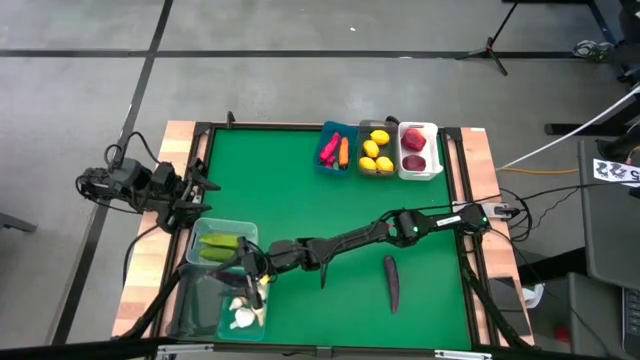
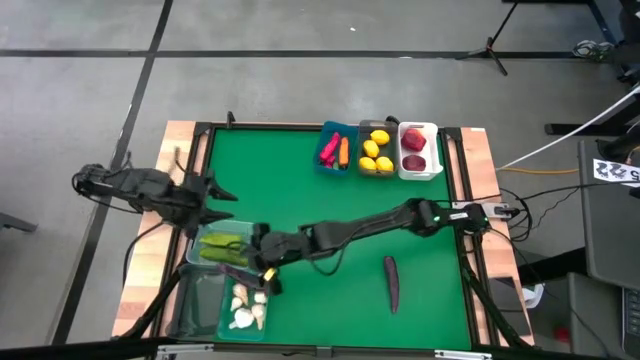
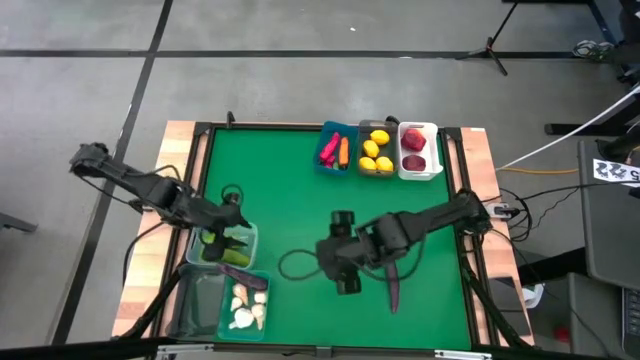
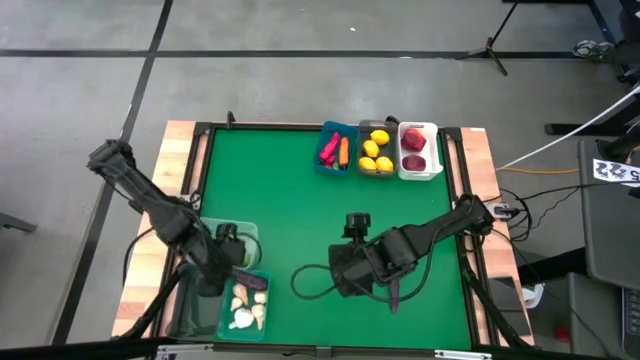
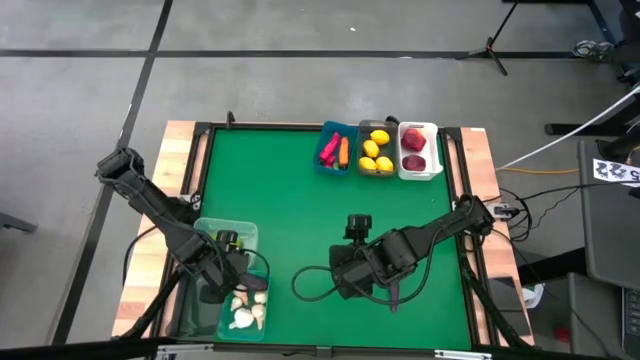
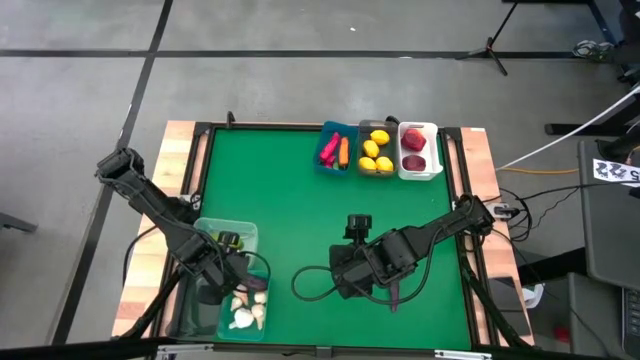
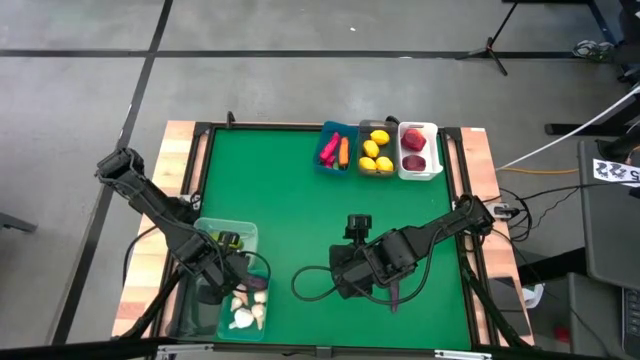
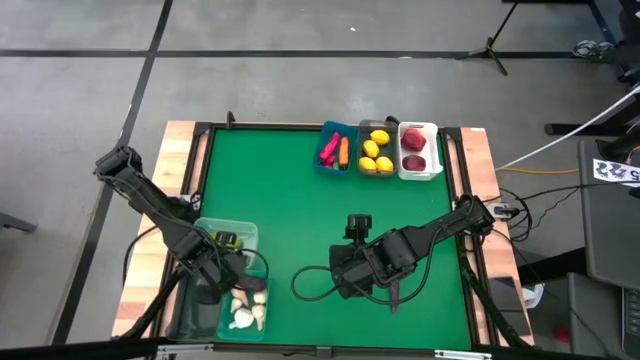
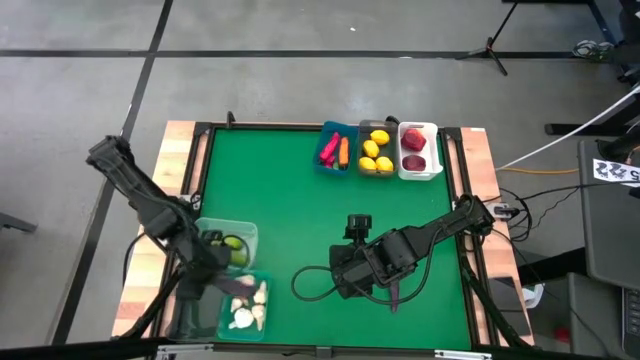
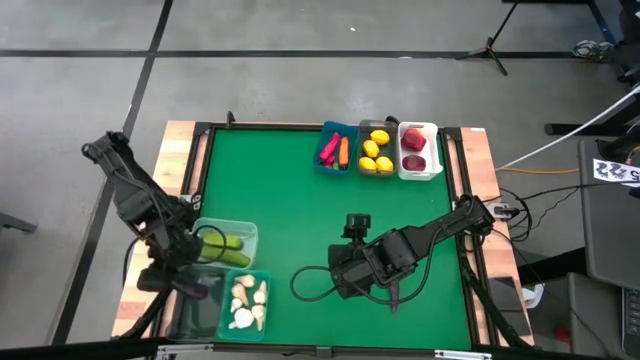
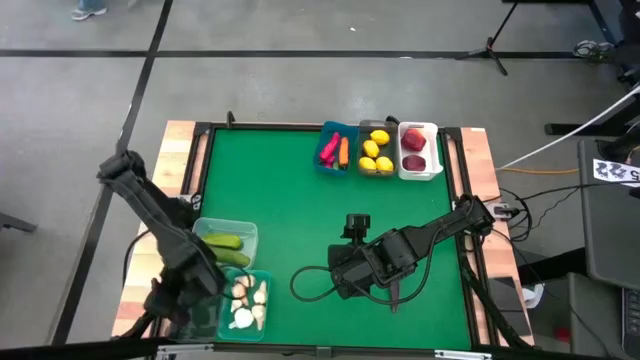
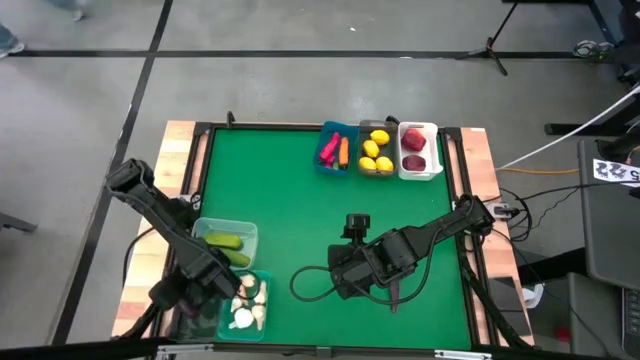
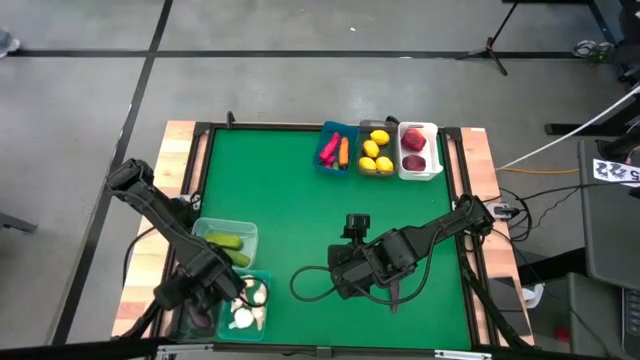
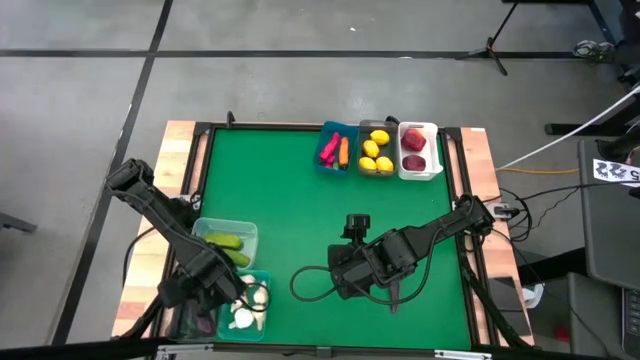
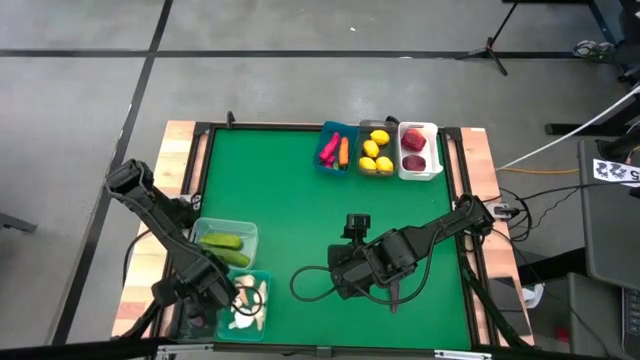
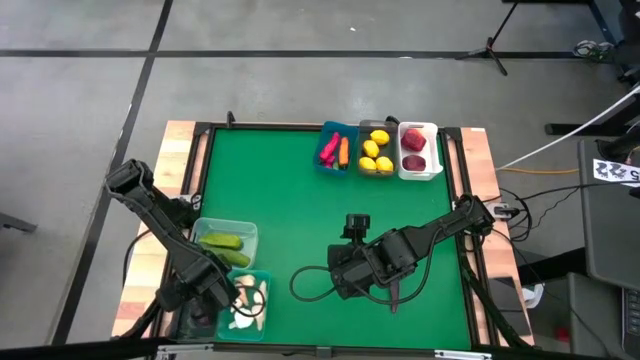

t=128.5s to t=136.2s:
Task: Sort produce into baskets
Put the violet eggplant into the bottom black bin

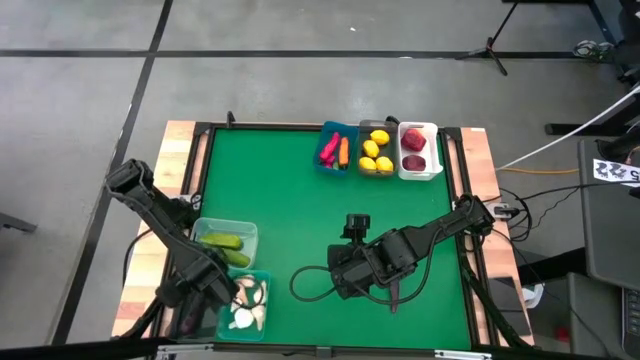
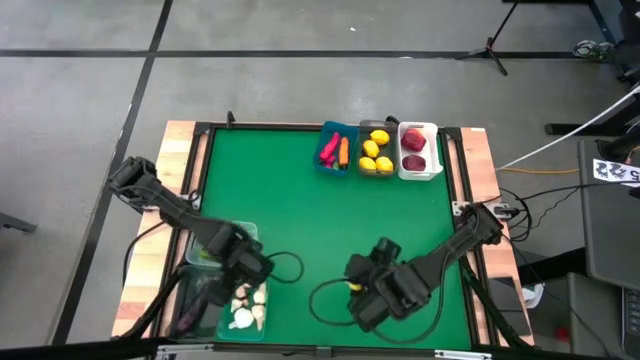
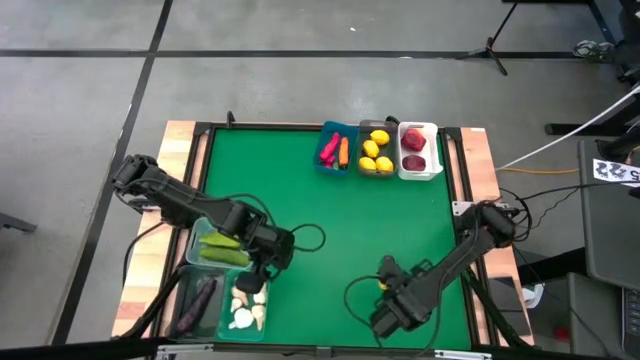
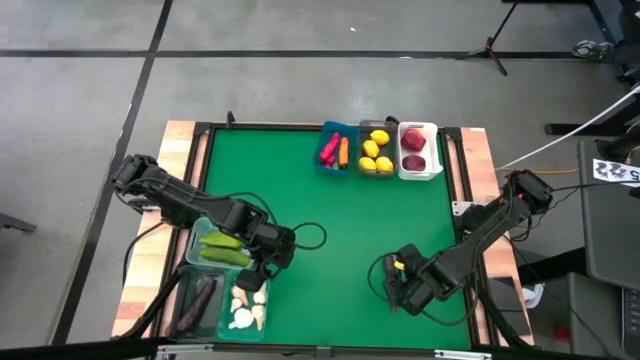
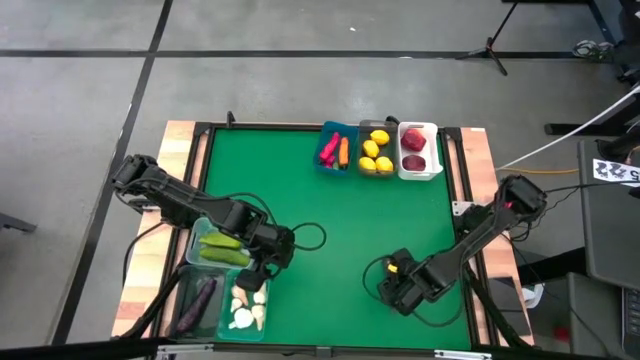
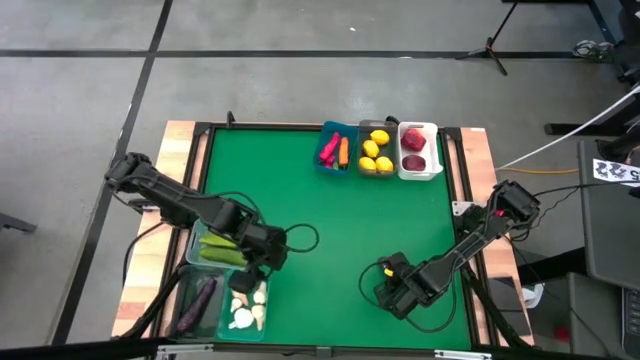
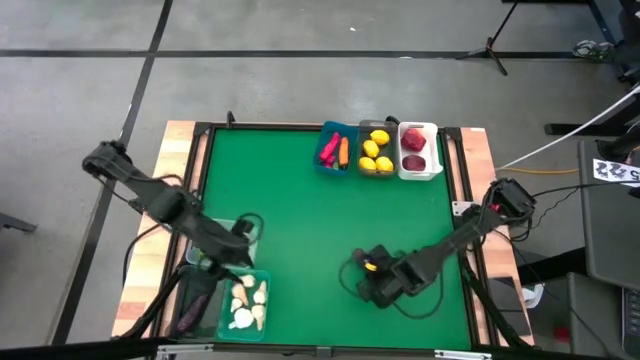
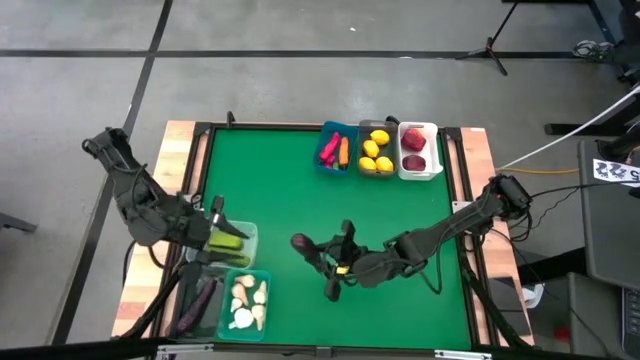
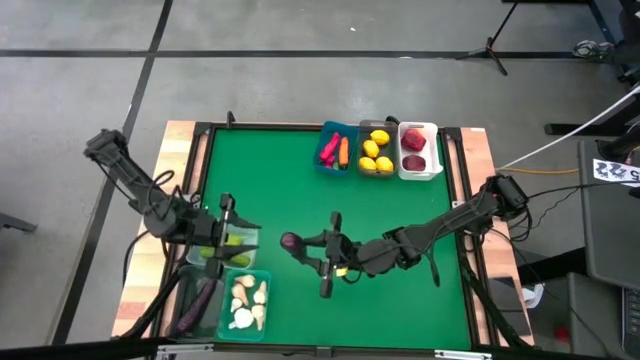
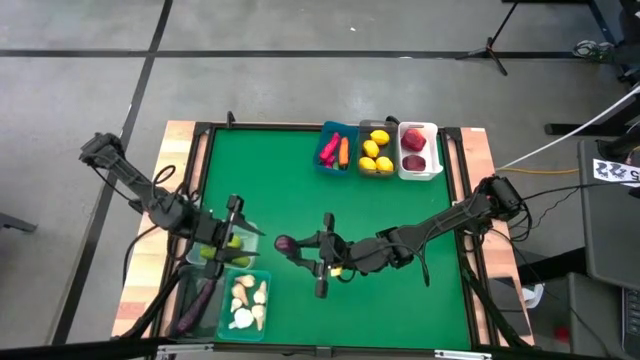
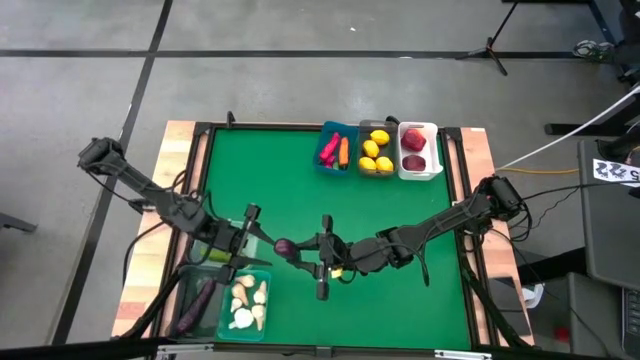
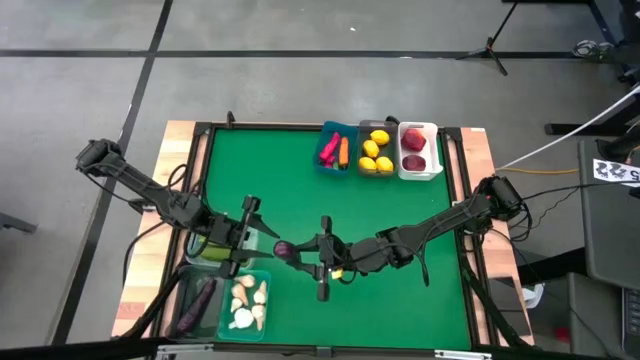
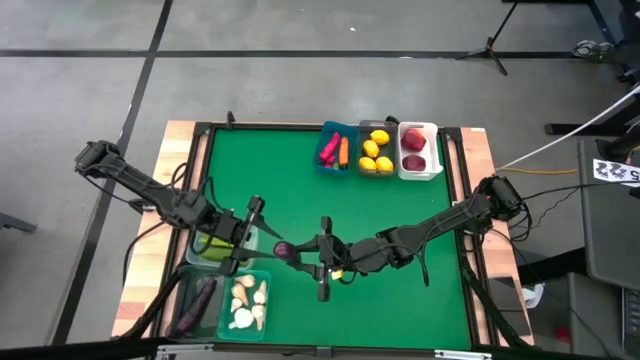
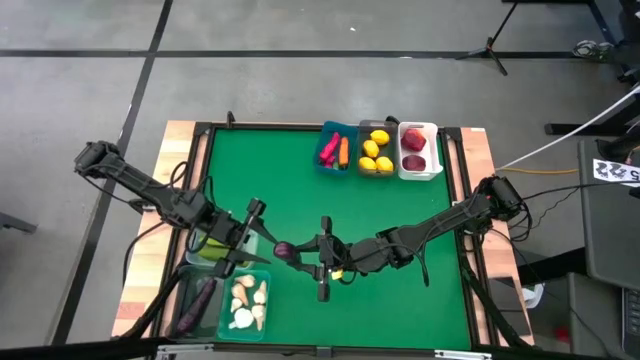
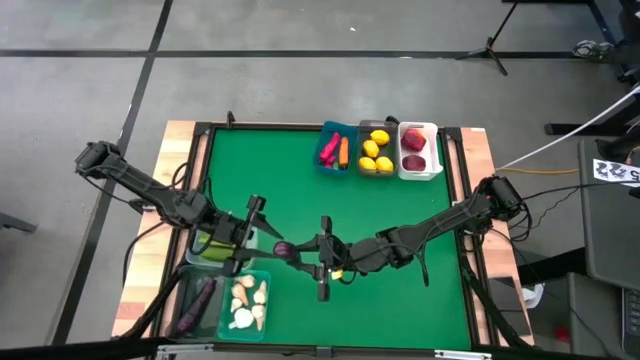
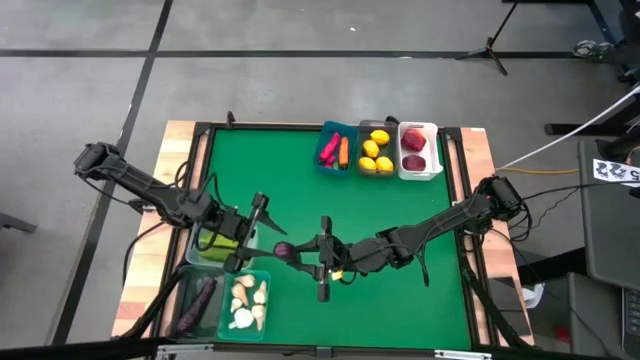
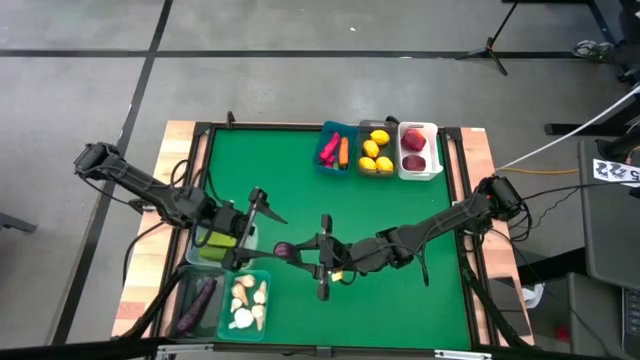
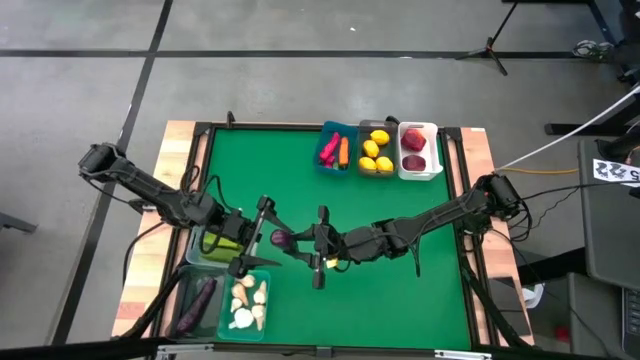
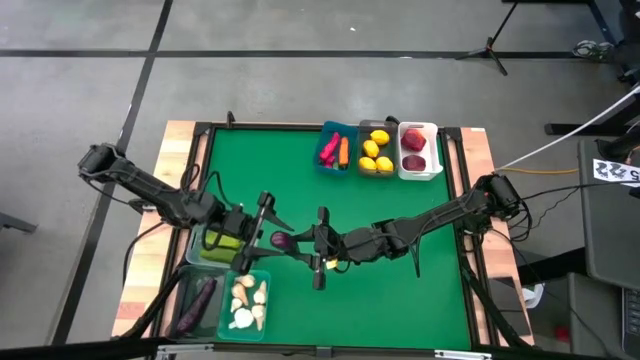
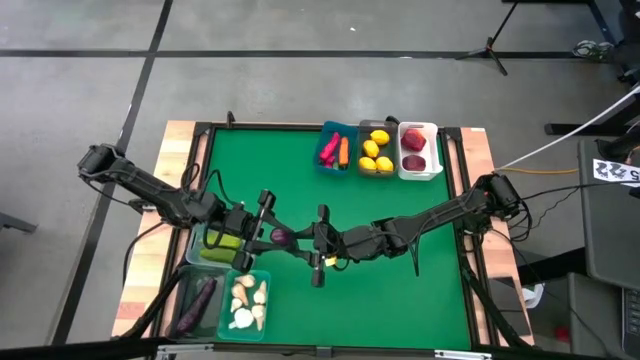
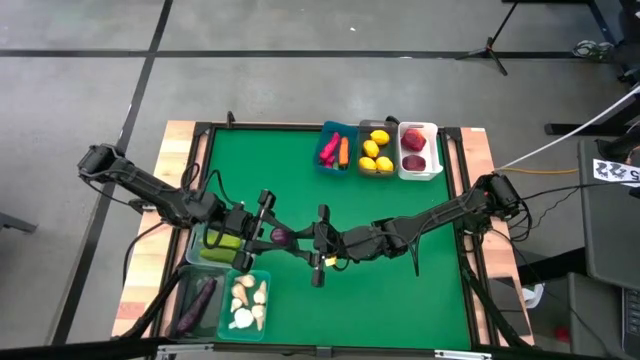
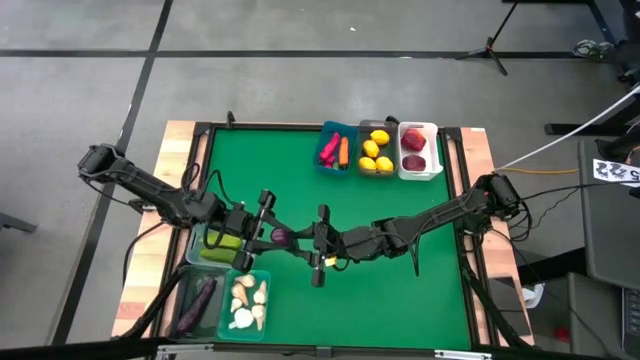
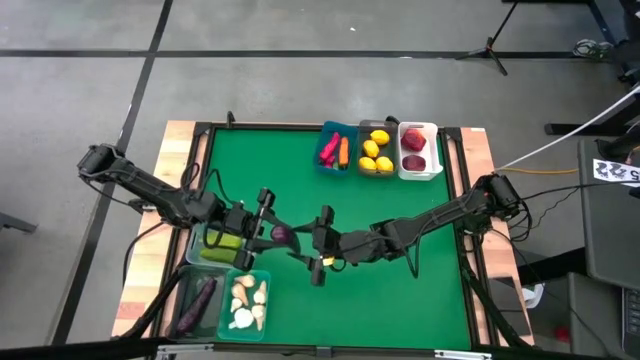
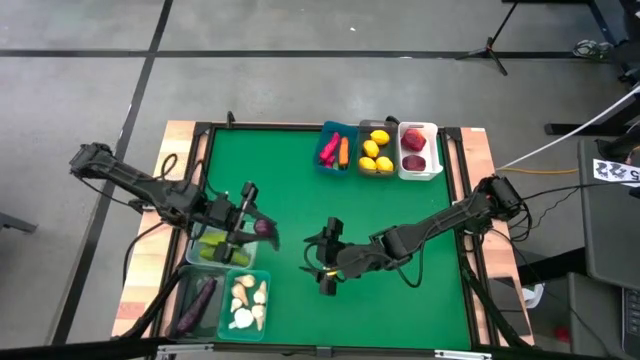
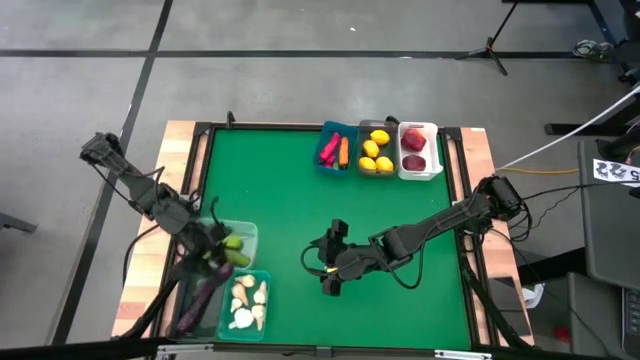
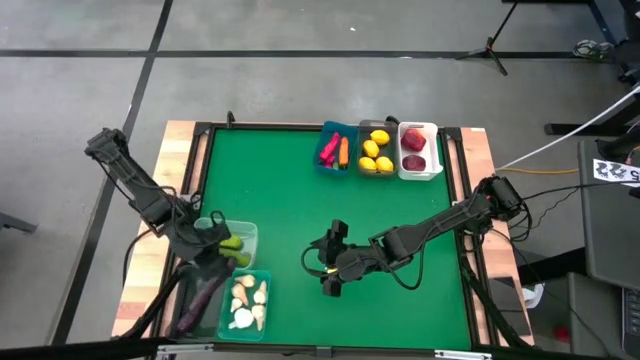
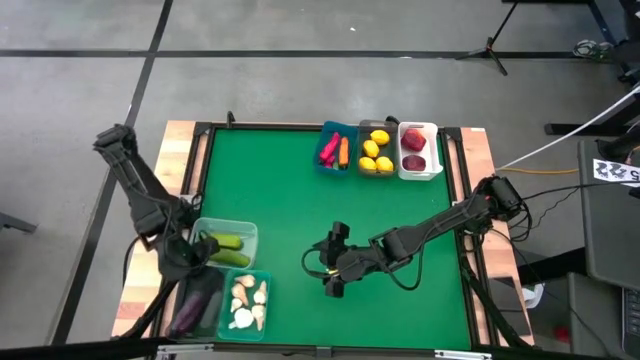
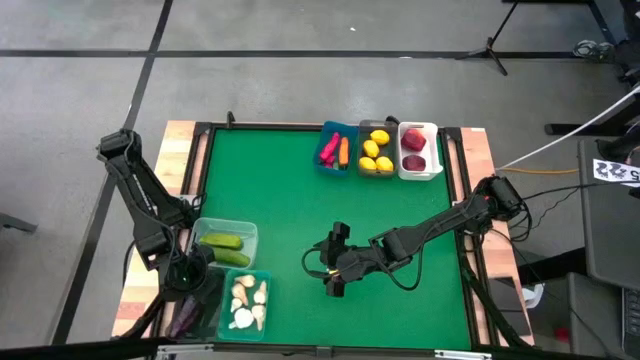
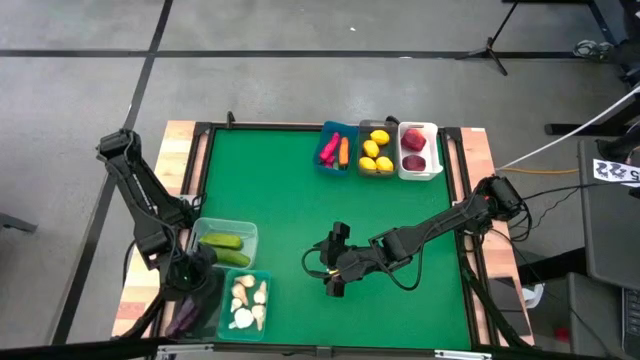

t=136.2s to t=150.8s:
Put the violet eggplant into the bottom black bin
